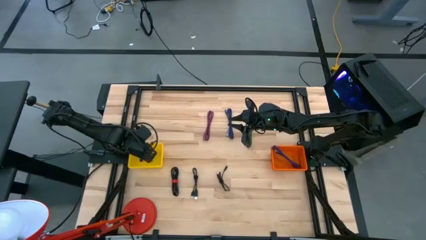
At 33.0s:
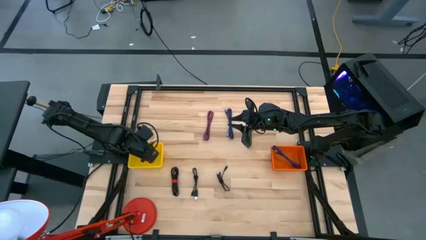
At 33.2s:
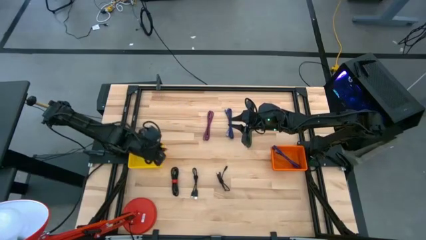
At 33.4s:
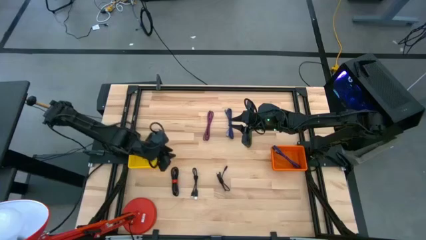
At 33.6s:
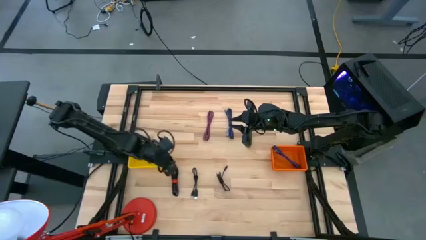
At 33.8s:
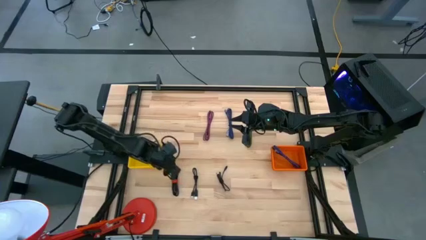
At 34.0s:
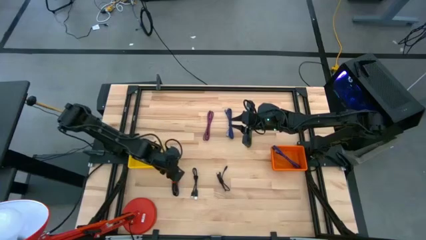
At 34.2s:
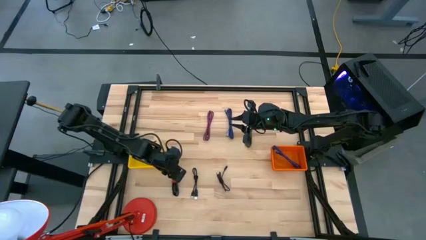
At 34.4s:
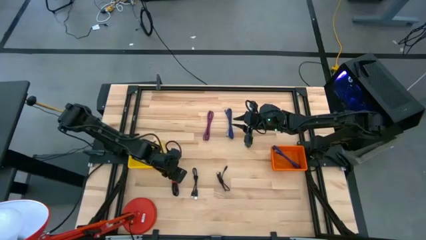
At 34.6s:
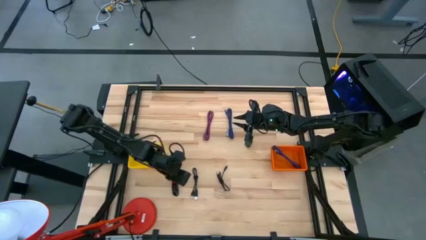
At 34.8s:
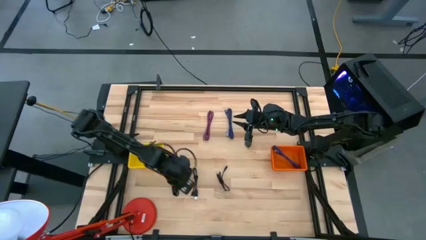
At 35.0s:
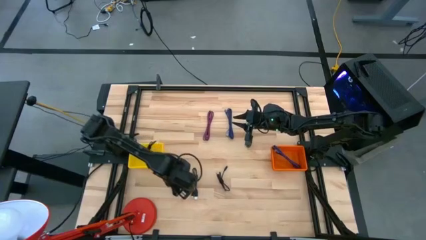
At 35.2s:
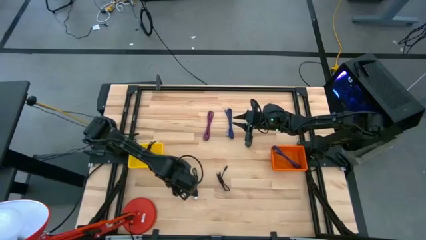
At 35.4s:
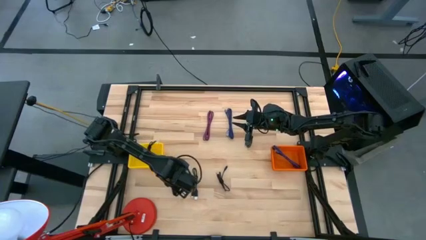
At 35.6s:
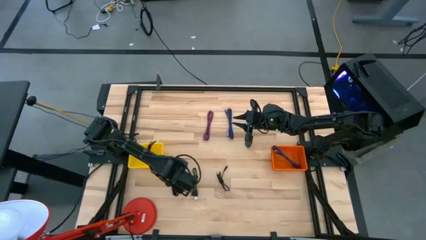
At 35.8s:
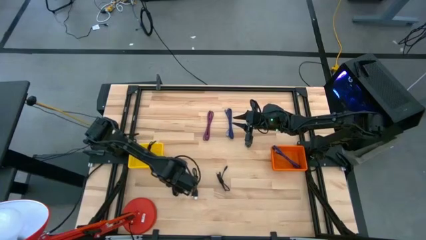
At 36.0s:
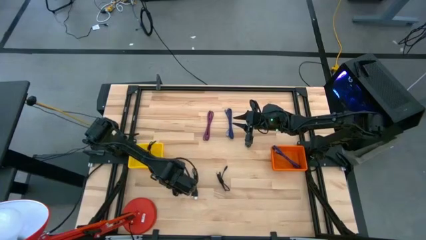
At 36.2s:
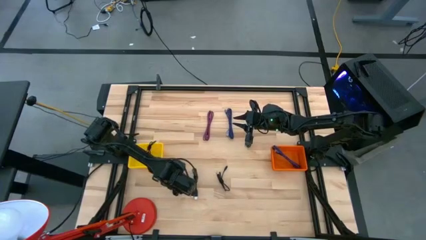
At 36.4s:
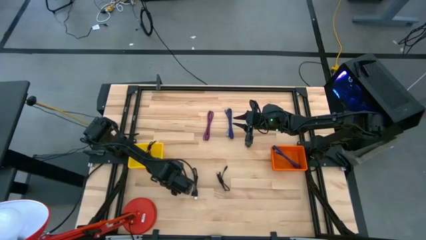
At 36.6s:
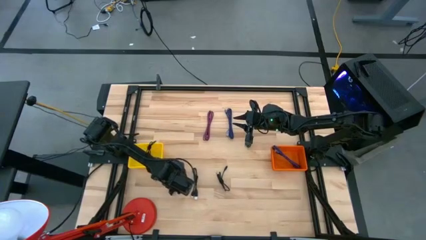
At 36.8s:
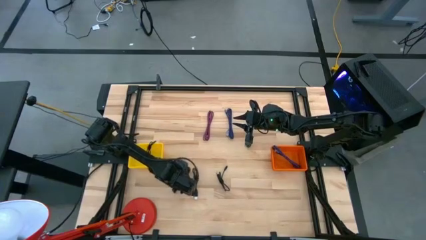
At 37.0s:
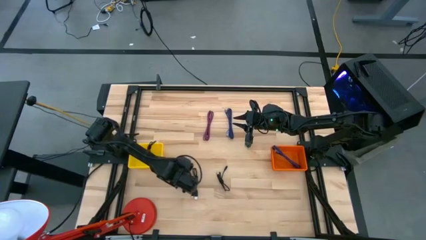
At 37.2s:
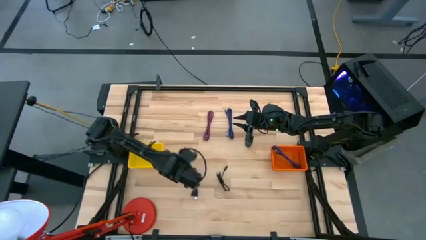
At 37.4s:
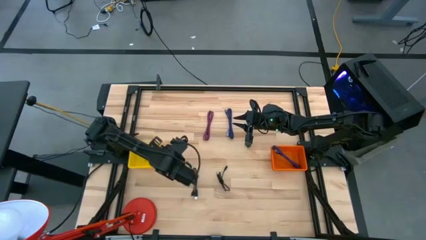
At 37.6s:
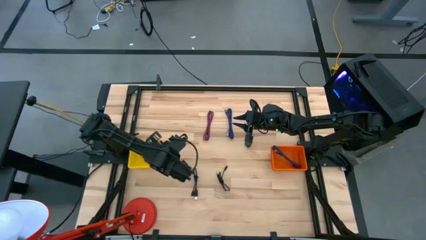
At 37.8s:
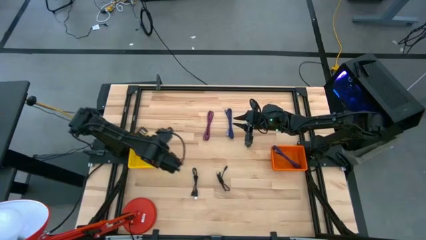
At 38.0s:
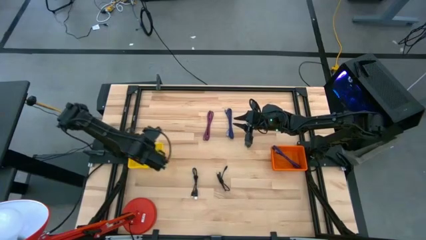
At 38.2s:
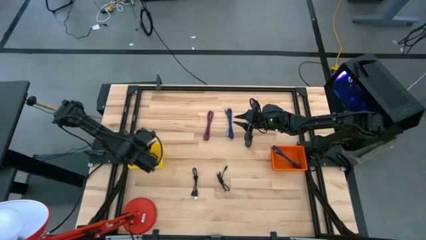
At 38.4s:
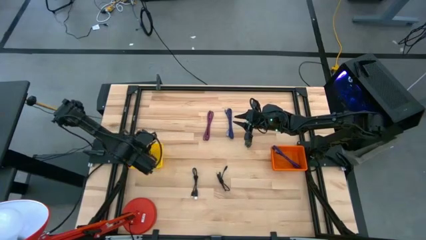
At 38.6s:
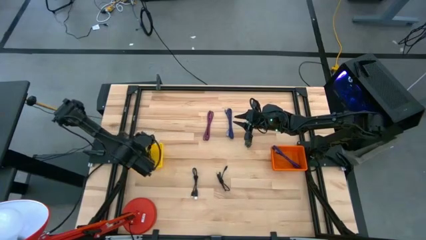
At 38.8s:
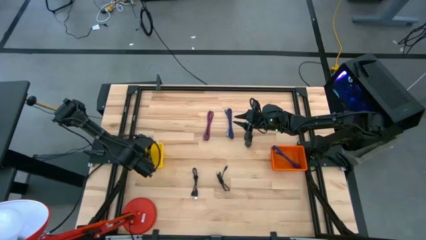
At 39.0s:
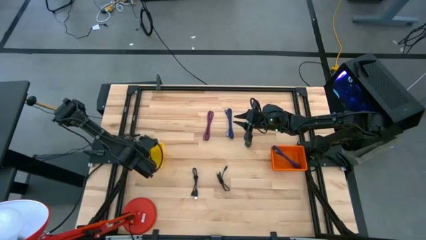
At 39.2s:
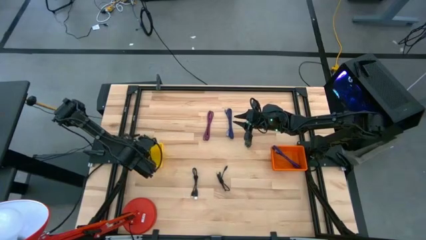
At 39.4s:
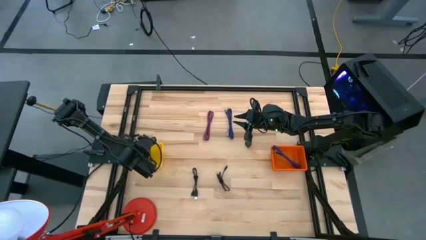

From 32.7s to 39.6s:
Task: Pick & Place USB Port
Put the black USB cable into the yellow bin

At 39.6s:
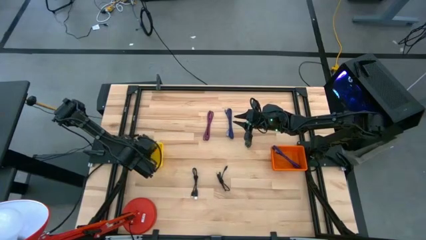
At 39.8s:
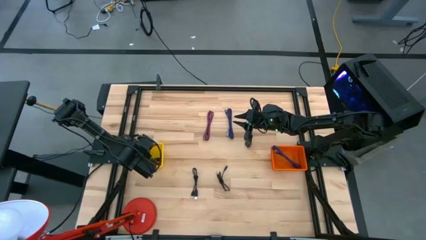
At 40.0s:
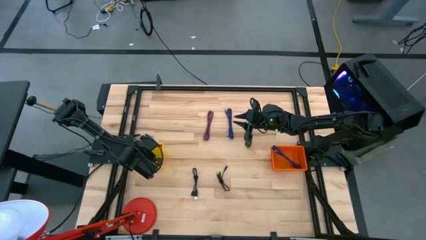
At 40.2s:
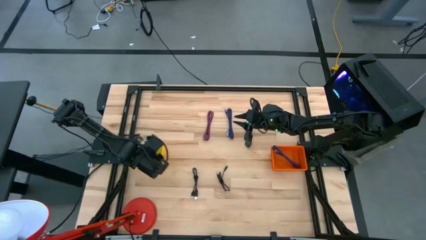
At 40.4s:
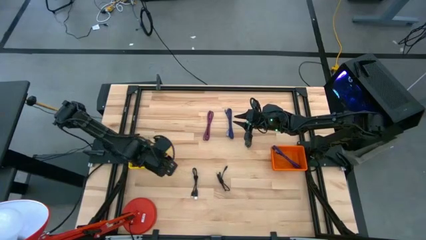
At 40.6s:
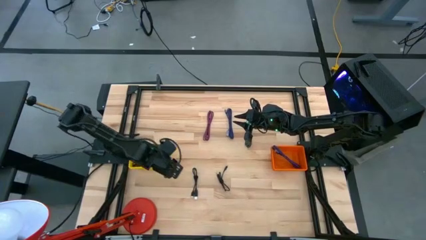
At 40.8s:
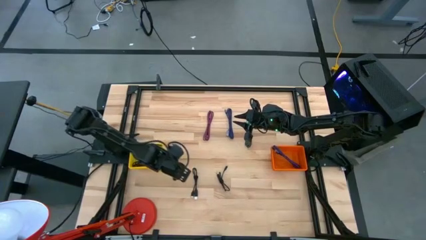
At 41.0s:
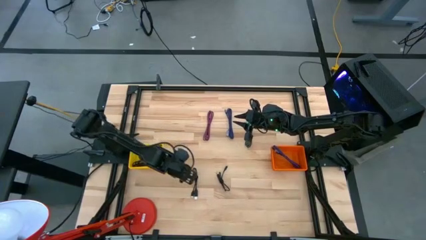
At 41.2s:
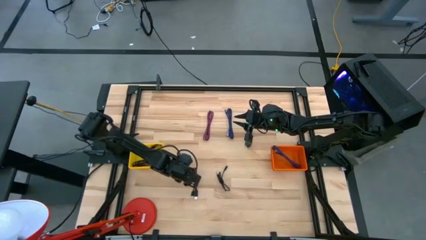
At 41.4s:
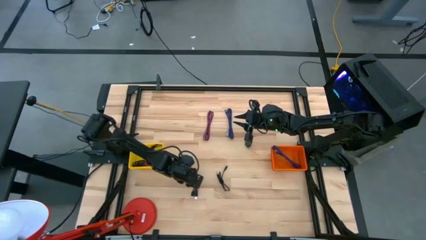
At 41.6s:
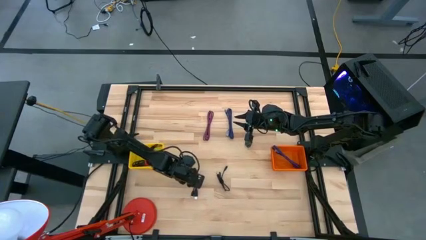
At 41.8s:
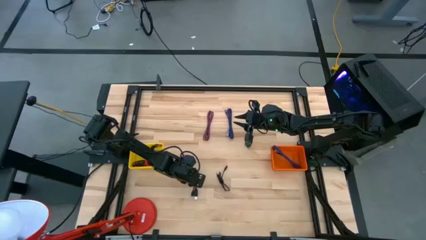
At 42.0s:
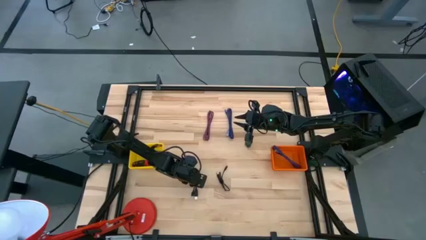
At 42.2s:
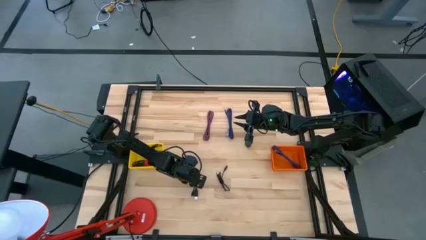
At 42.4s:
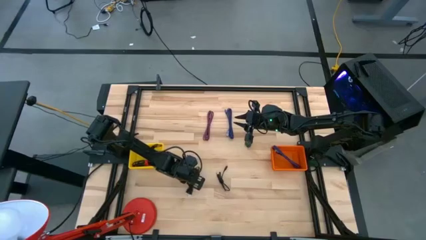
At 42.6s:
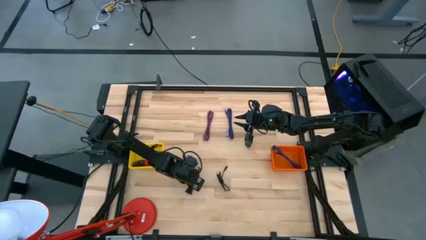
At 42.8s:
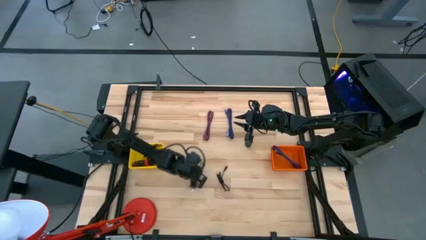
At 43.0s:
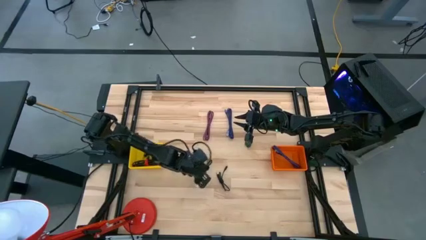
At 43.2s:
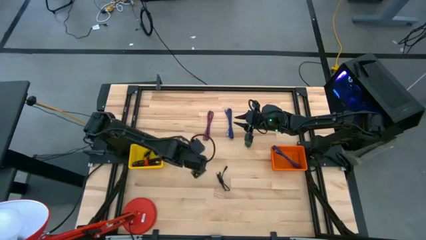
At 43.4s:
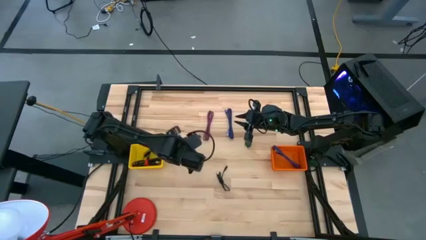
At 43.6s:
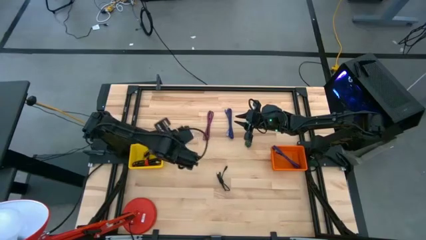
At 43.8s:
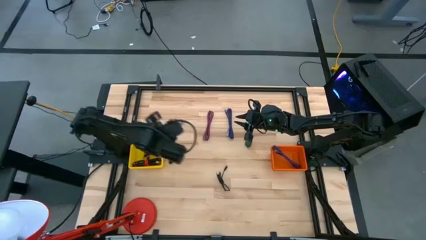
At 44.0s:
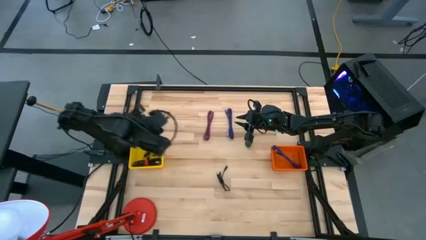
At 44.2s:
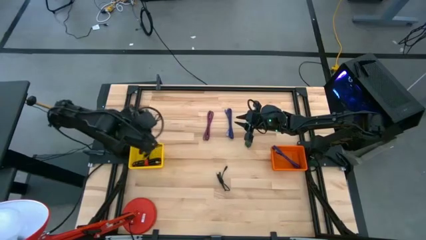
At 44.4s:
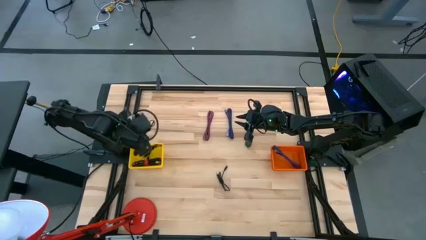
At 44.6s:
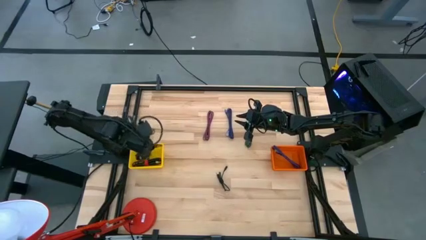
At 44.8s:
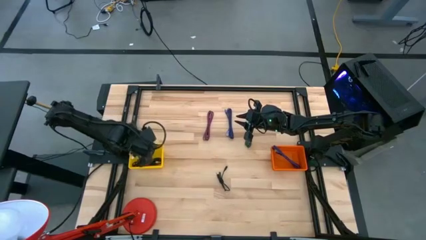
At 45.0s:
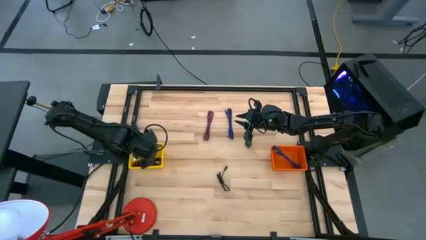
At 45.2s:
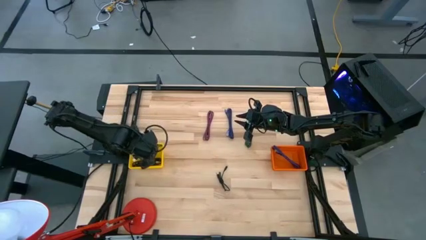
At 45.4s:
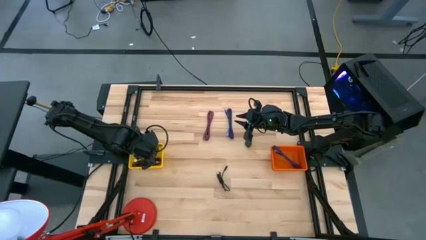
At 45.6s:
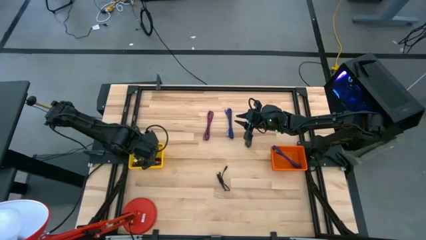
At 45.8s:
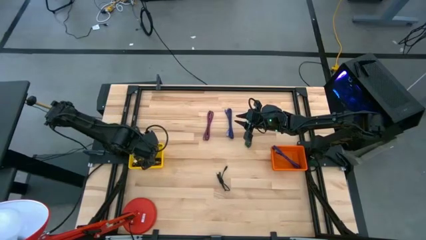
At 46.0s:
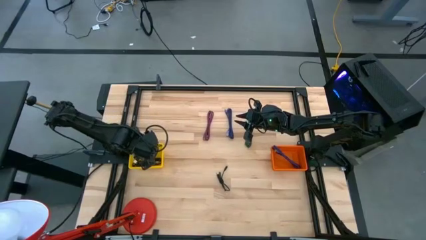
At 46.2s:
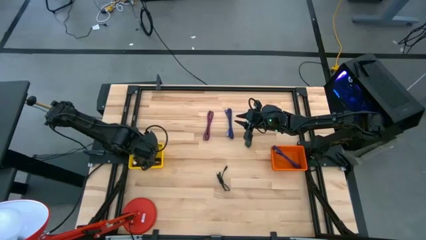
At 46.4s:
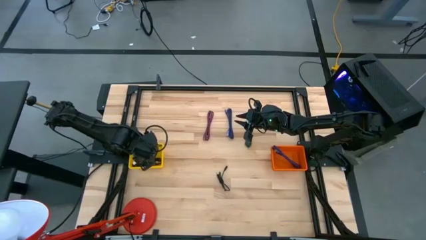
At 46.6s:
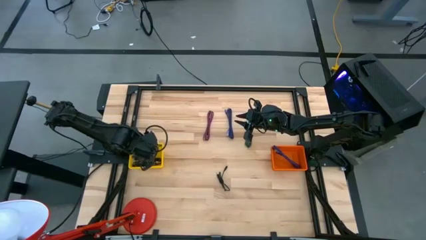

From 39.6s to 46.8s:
Put the black USB cable into the yellow bin

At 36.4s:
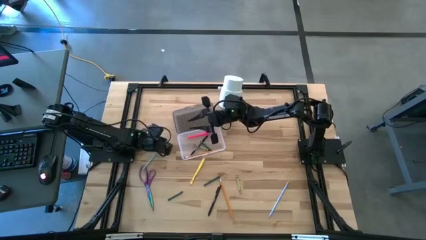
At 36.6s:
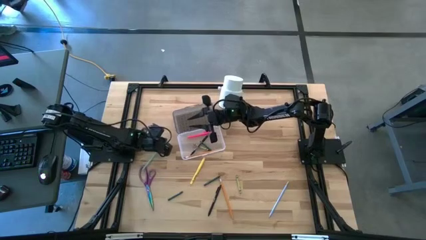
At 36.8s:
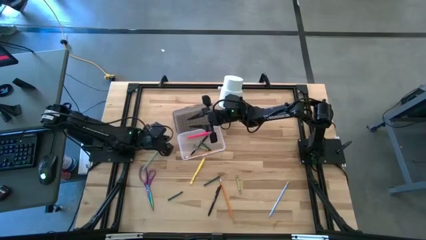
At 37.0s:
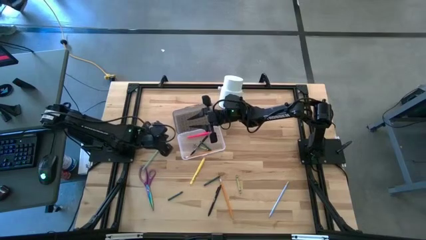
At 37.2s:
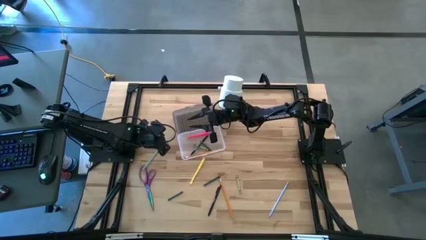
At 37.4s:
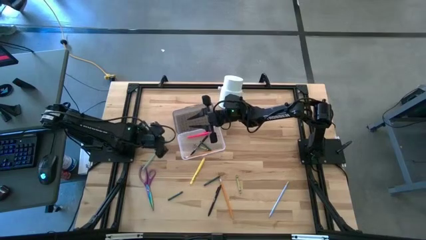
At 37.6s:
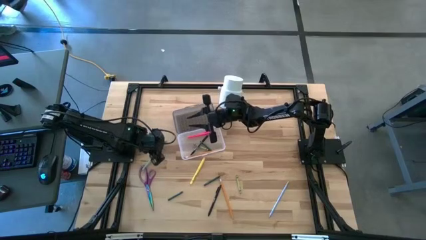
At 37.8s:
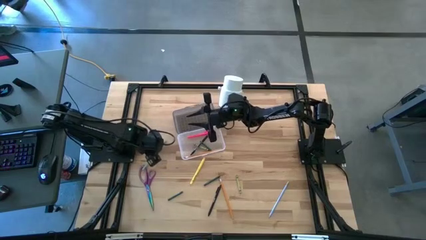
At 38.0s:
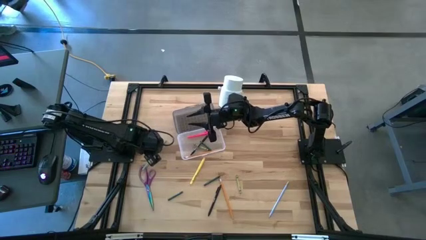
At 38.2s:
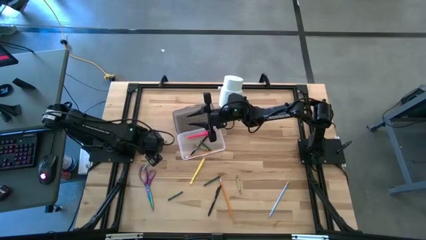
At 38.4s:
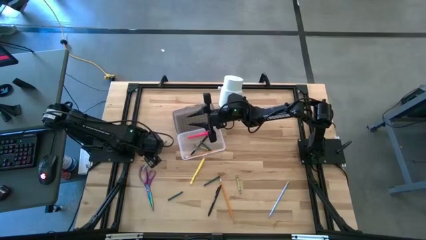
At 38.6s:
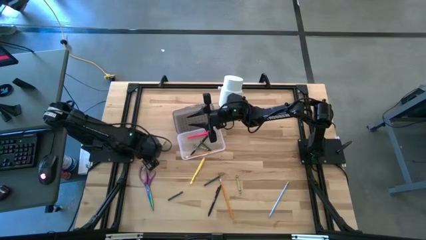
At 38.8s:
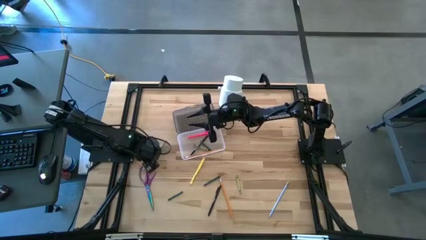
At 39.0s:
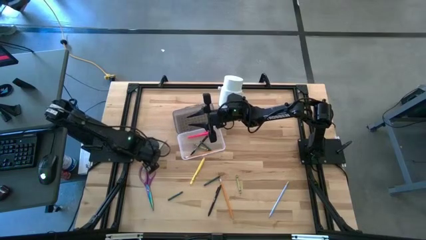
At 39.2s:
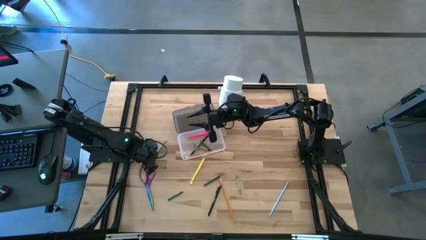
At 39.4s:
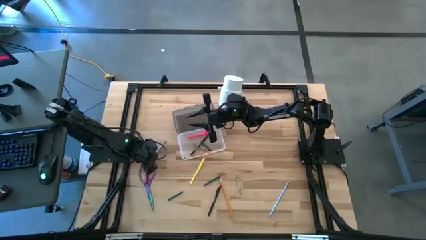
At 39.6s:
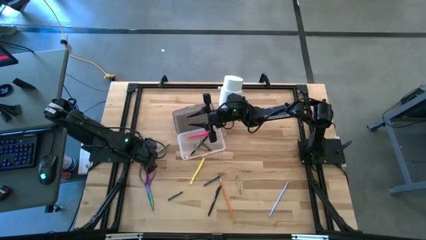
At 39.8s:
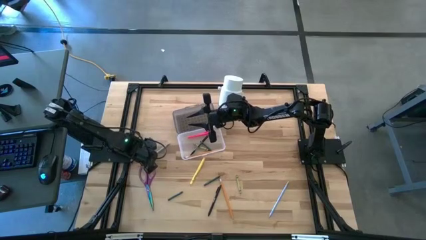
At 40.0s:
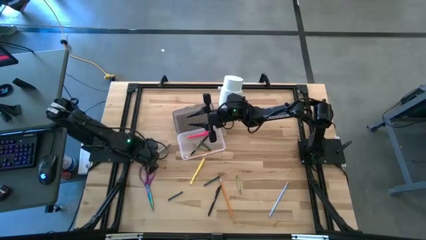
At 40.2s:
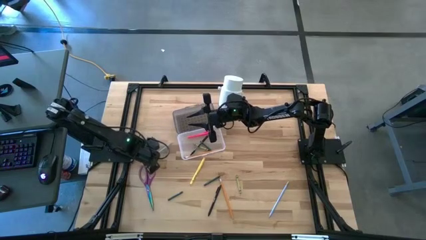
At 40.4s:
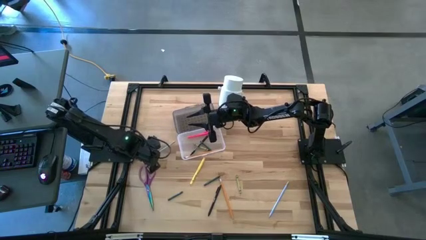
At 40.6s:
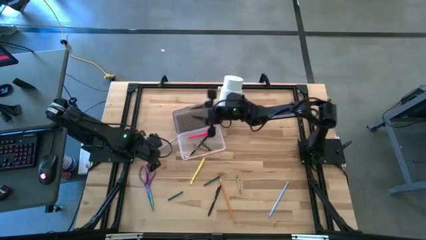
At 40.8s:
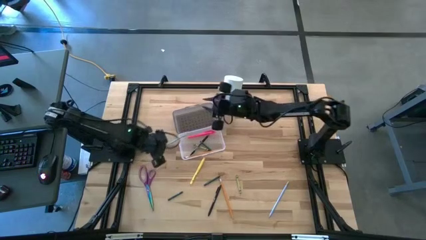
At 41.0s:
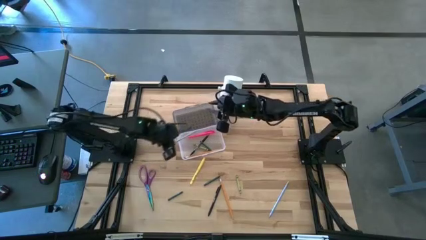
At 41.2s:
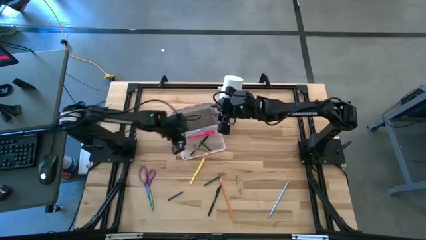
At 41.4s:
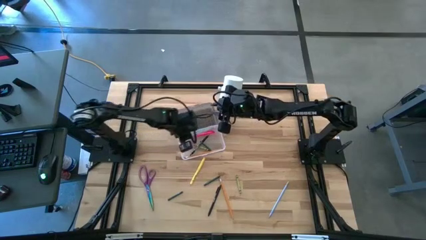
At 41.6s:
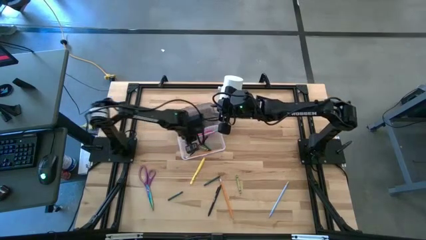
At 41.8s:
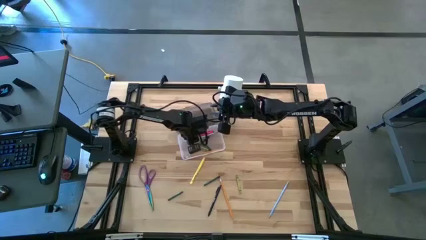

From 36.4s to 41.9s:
Task: Pick & place school supplies into a supply box
Put the left light blue colored pencil into the black supply box
